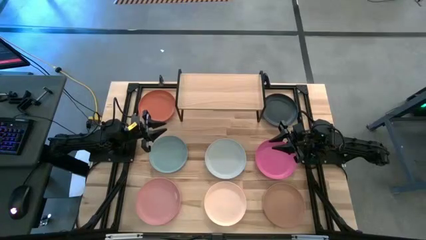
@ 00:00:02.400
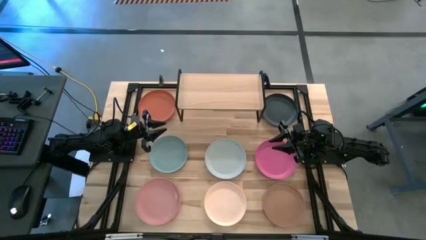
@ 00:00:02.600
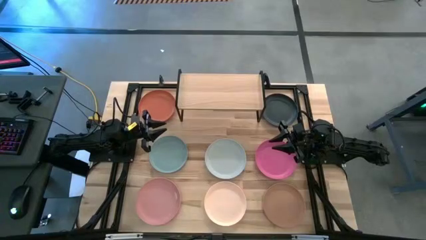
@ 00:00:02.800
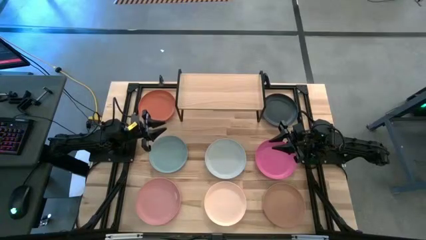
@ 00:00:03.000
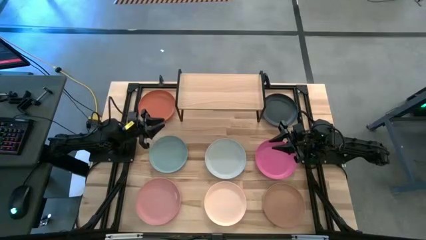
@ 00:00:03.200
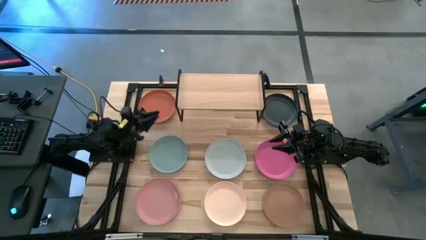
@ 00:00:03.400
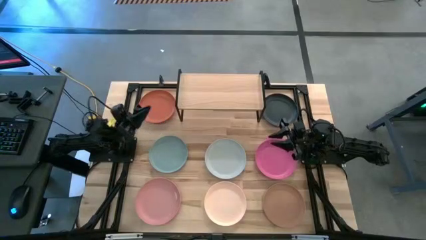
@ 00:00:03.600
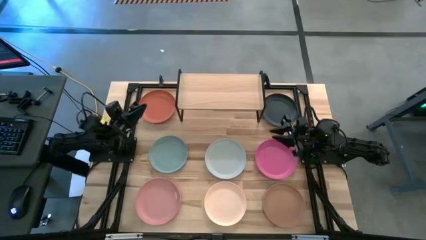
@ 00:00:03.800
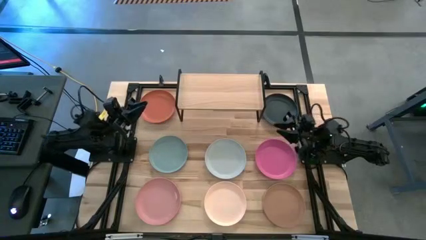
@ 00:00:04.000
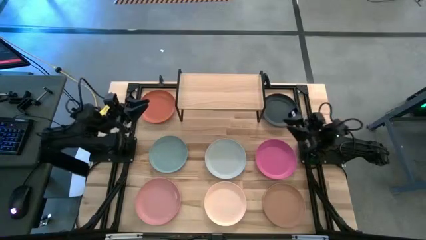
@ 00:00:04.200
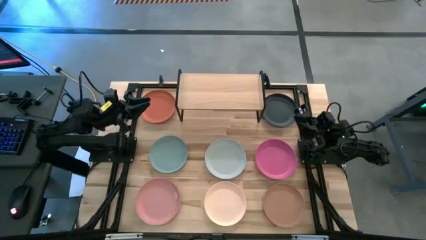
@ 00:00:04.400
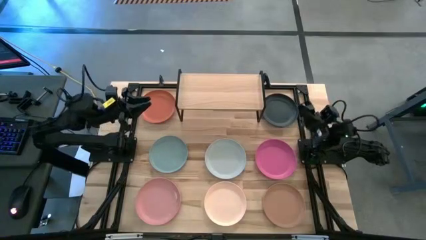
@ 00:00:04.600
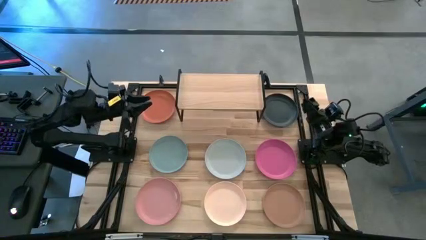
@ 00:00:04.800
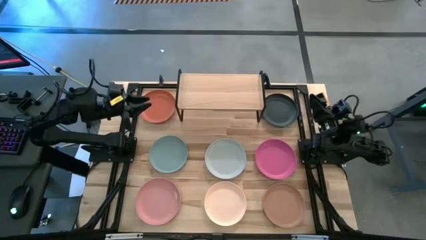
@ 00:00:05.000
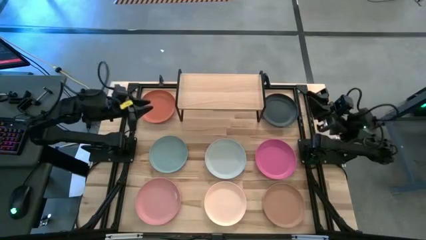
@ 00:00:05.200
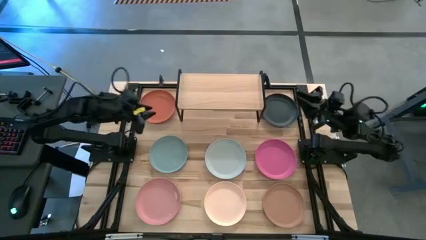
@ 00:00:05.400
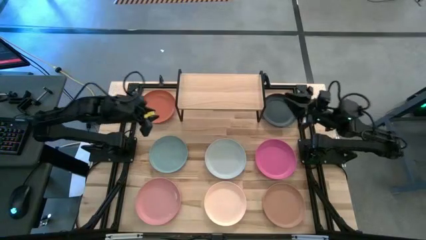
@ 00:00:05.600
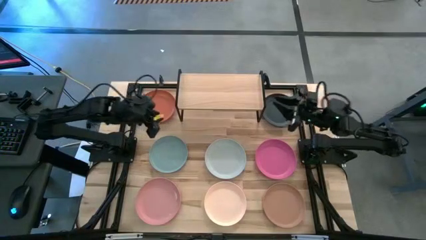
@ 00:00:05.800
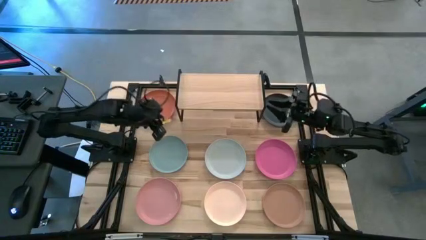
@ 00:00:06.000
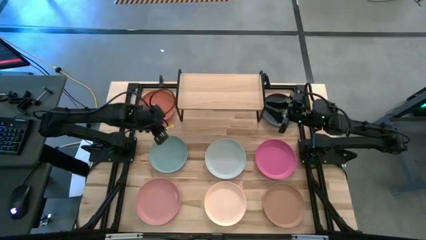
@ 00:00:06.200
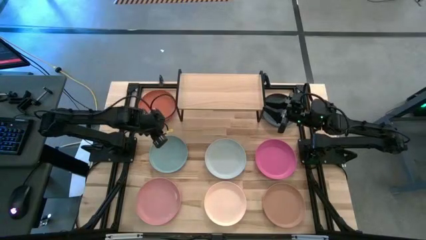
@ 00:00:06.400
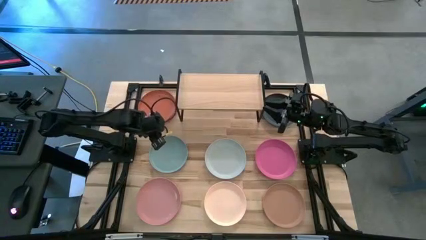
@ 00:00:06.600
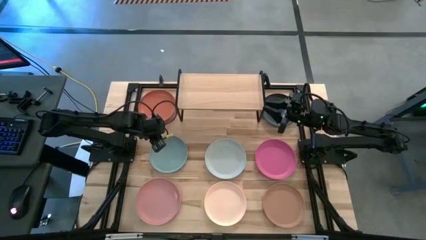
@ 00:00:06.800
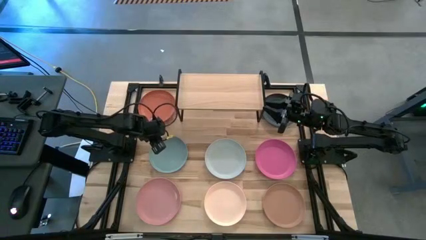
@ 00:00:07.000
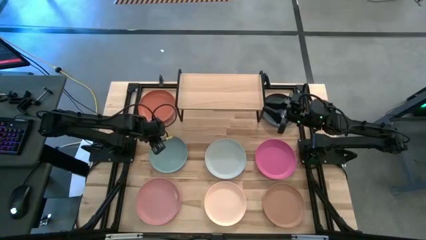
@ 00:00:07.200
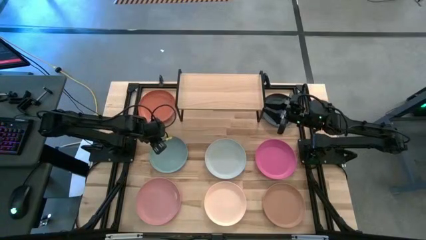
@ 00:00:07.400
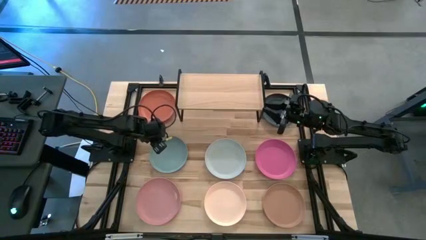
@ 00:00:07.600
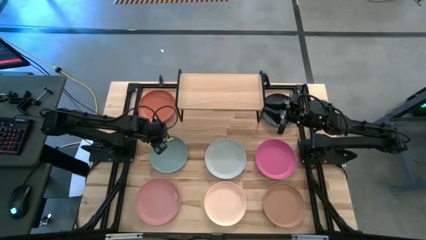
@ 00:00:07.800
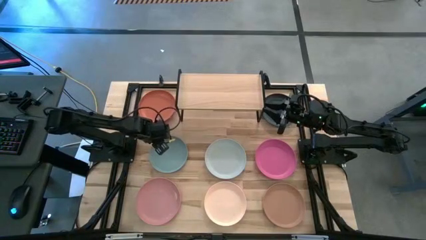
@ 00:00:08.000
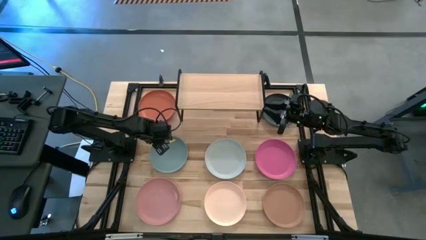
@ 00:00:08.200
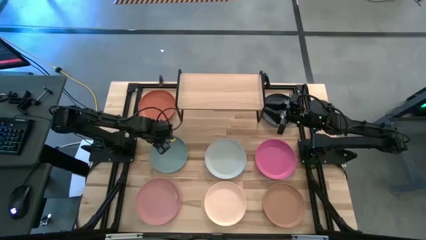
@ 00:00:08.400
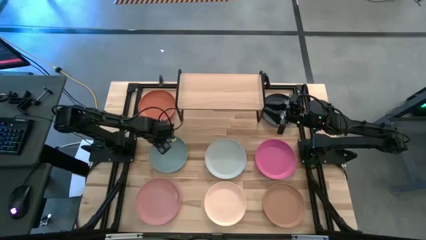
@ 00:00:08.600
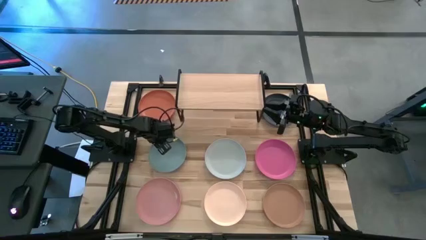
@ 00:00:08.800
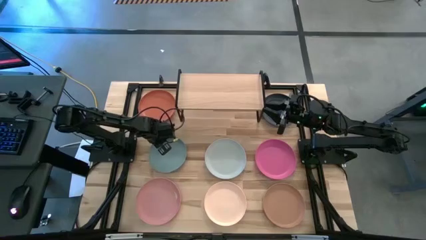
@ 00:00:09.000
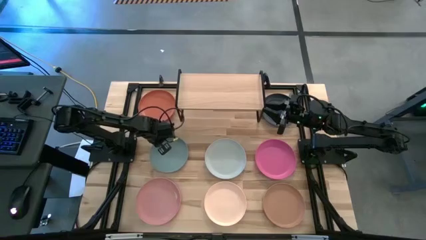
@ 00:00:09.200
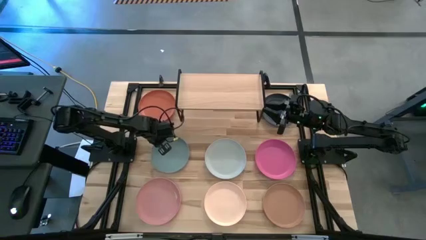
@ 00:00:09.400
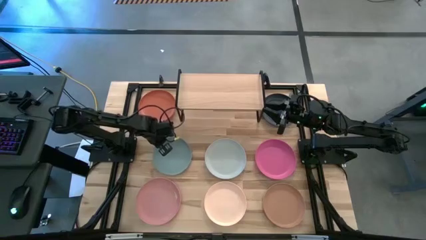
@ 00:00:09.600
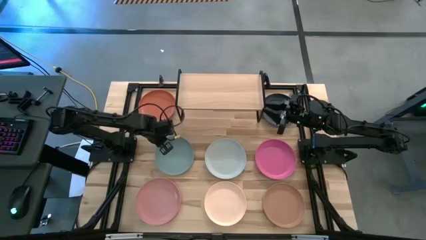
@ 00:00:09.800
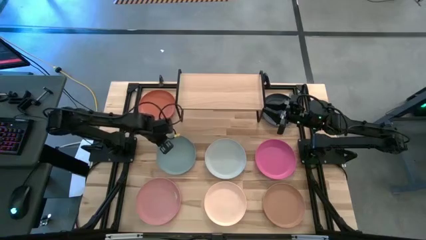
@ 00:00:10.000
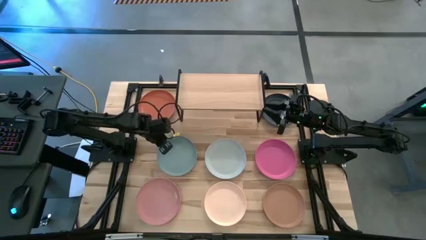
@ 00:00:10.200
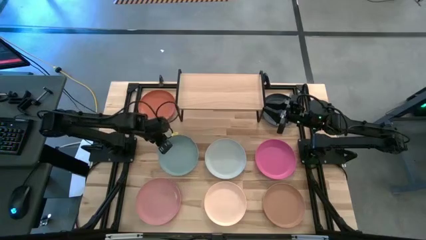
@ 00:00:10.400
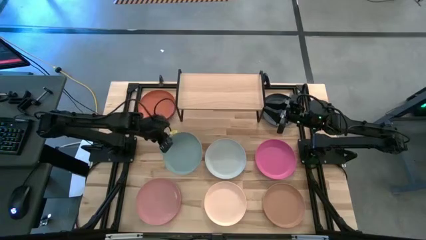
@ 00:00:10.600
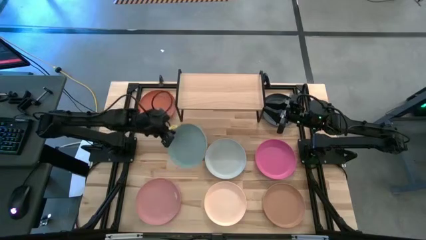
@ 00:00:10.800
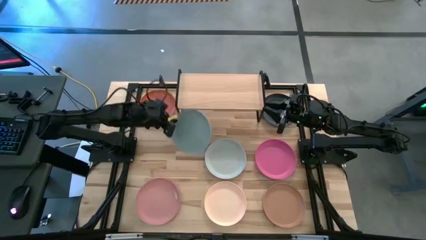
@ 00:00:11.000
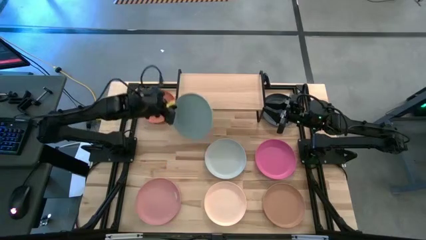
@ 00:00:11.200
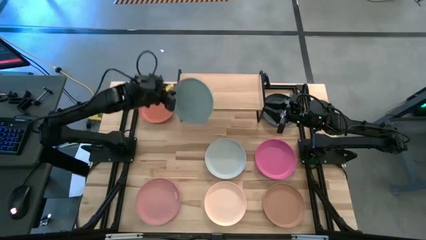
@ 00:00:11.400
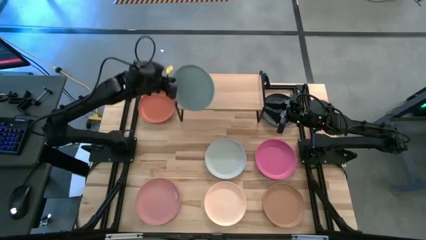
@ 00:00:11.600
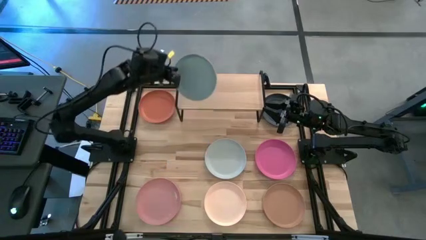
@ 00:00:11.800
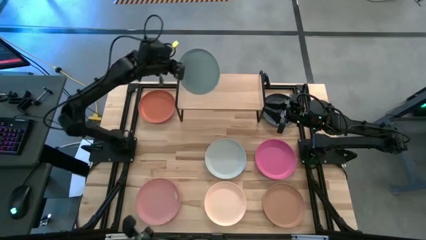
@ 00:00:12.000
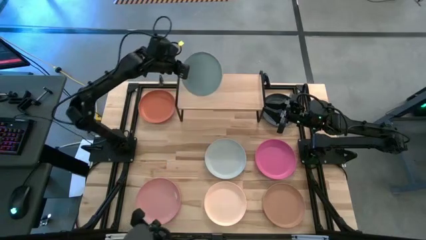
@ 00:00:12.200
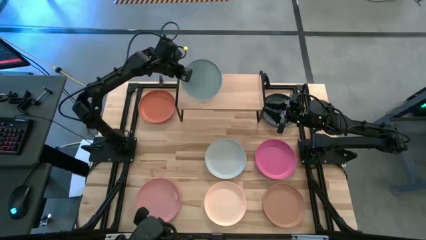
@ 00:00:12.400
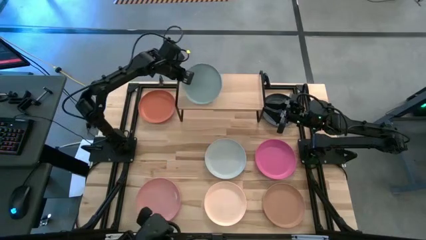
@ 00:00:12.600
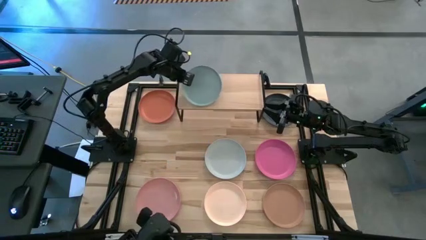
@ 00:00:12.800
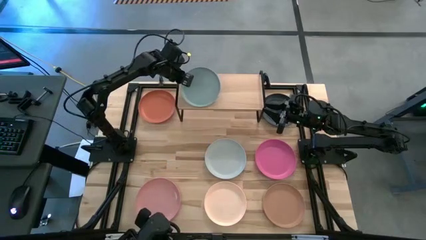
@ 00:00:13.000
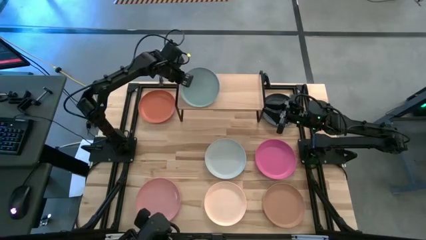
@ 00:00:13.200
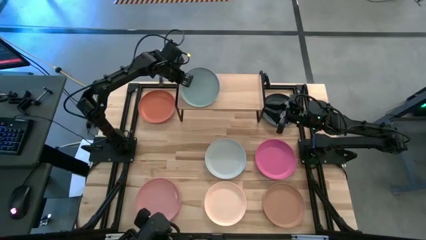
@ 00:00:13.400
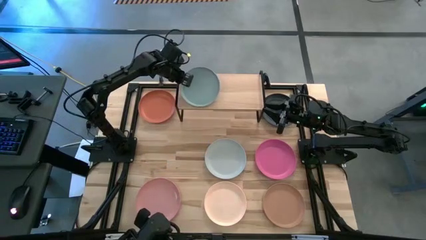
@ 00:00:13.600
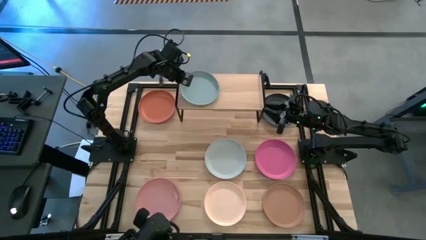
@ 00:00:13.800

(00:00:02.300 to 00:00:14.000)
Task: Place and stack plates onto a shelf
Put the gray plate on the shelf

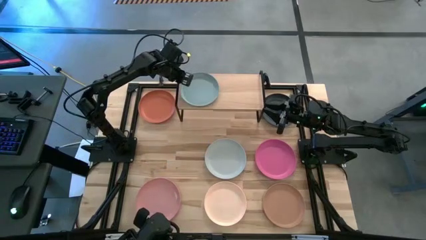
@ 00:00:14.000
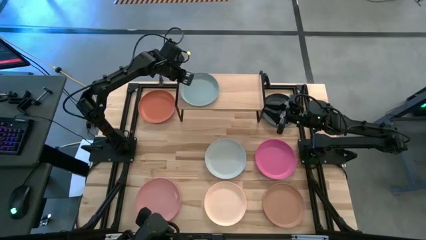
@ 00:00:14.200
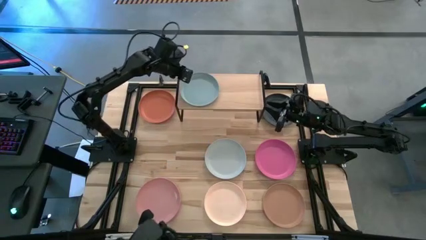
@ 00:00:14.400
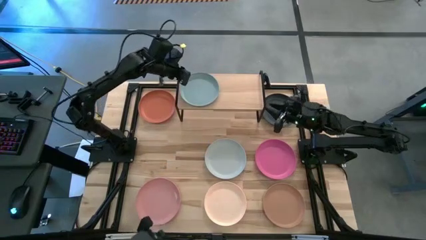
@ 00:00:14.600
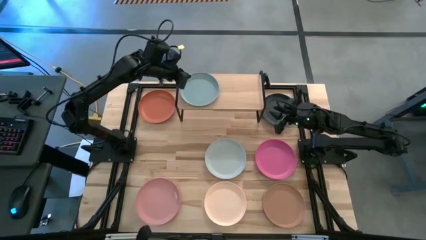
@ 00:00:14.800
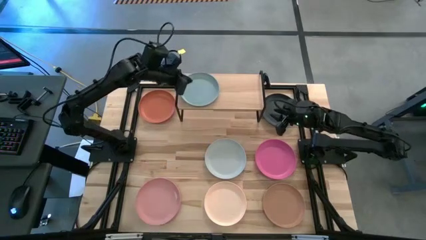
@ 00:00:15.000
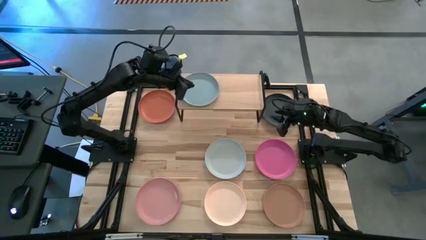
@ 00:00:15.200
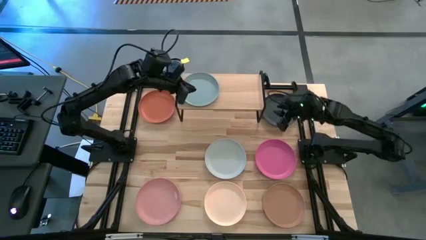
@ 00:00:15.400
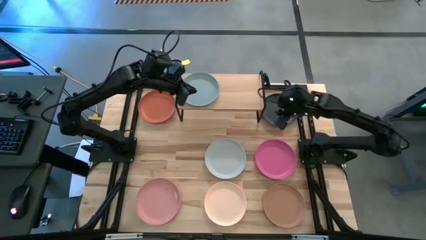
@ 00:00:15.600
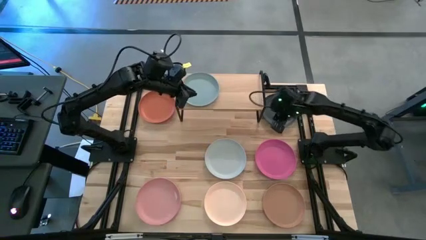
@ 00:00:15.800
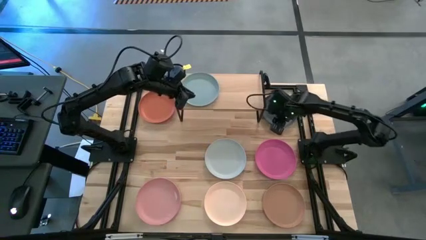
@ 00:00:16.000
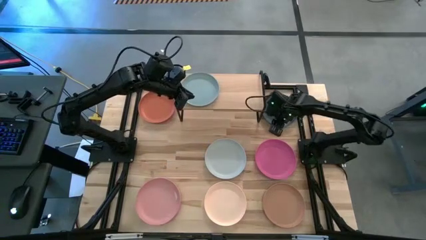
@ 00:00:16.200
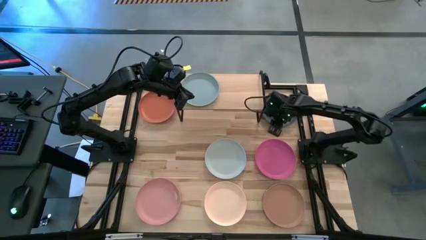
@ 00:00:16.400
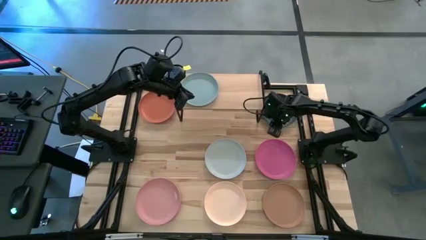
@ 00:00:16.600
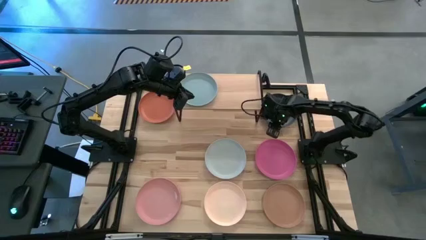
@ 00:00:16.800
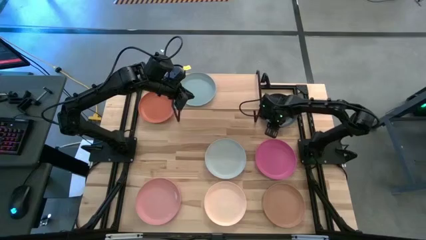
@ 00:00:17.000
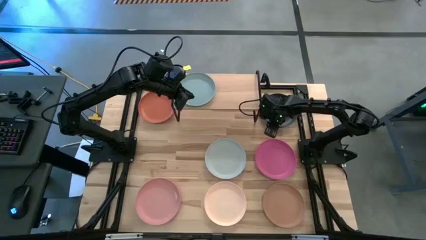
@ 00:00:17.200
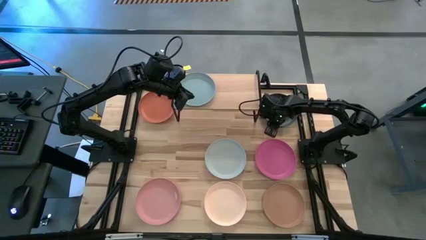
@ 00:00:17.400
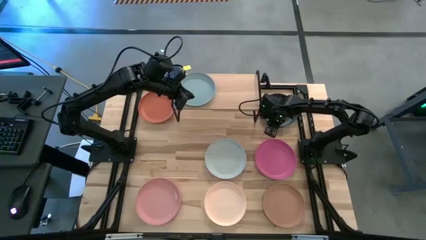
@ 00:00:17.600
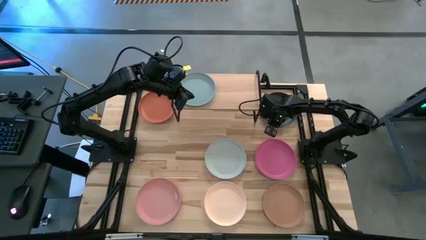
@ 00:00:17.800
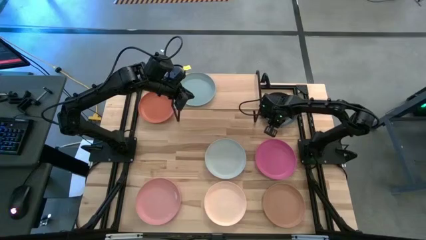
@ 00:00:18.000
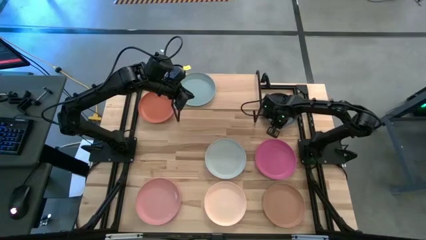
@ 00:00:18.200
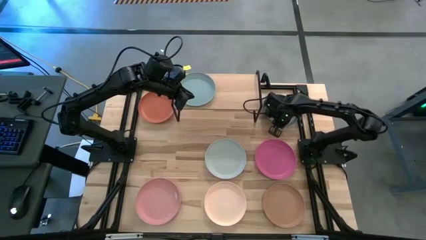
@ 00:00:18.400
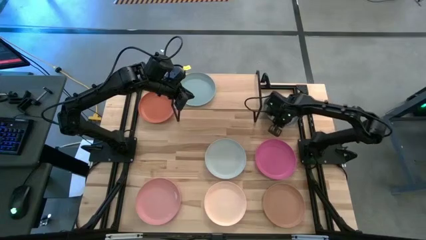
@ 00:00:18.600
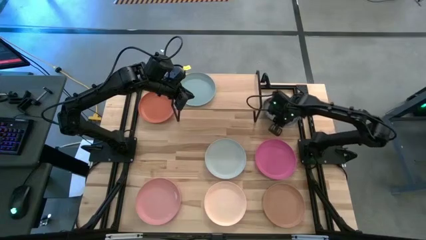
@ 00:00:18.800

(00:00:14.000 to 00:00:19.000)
Put the dark green plate on the shelf

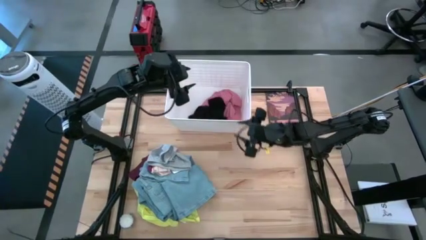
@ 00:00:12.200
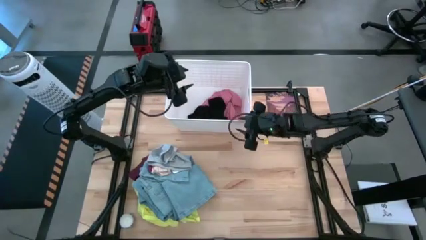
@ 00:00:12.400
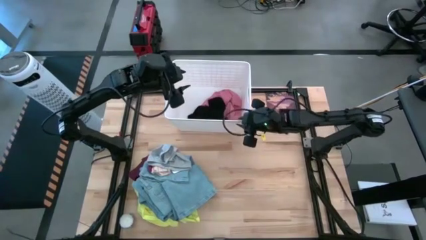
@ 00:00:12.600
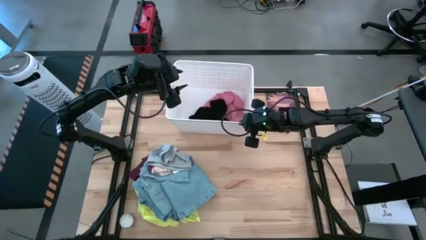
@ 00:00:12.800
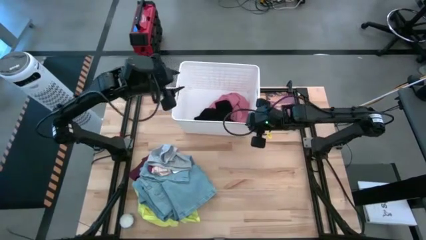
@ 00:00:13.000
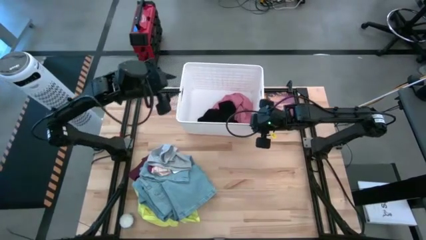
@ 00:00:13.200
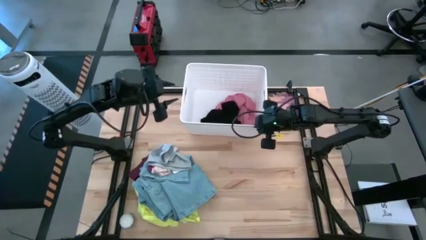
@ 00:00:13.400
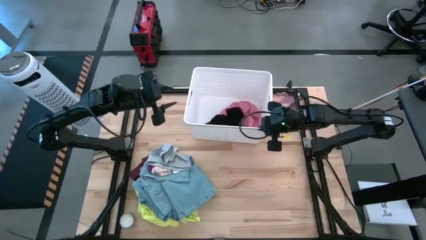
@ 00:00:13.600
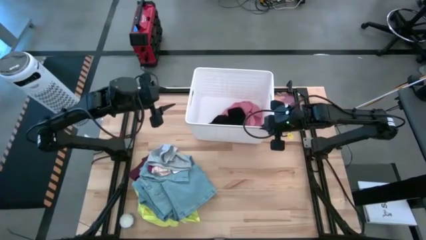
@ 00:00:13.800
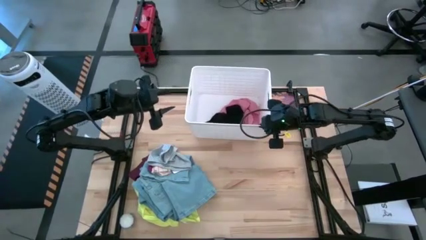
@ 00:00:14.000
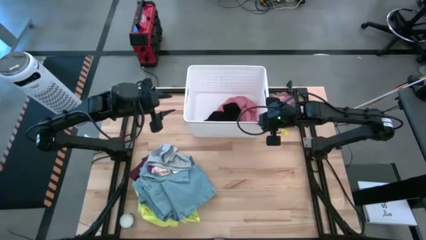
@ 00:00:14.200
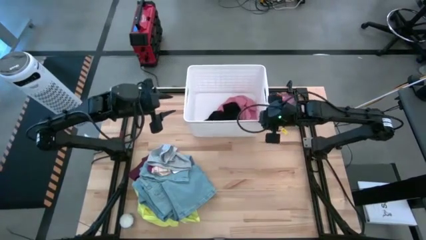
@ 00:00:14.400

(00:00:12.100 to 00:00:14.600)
Task: Sort clothes
Adjust the white laundry bin
